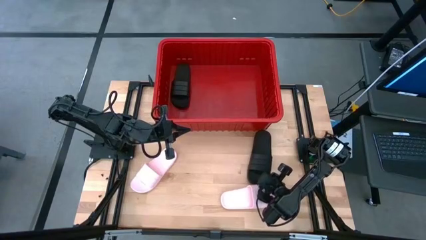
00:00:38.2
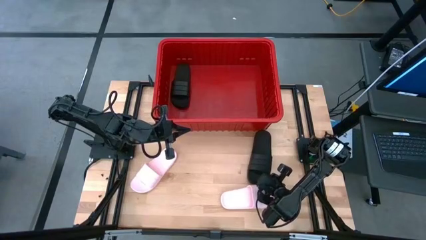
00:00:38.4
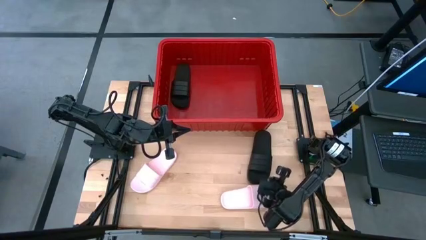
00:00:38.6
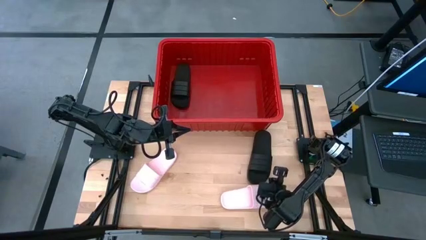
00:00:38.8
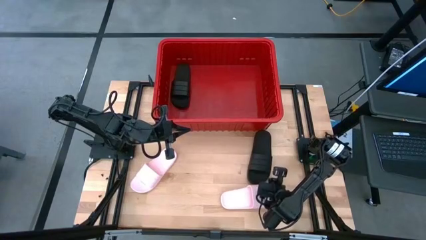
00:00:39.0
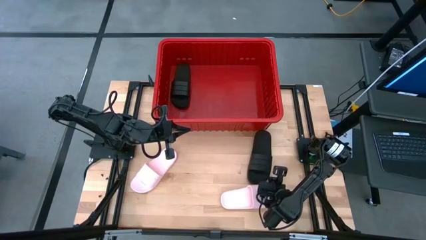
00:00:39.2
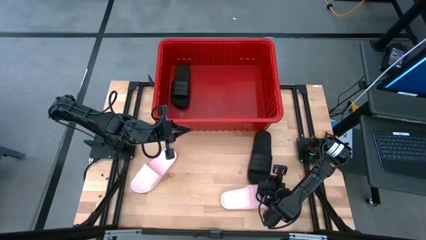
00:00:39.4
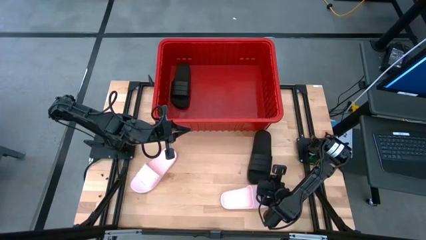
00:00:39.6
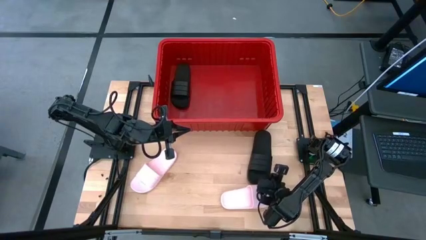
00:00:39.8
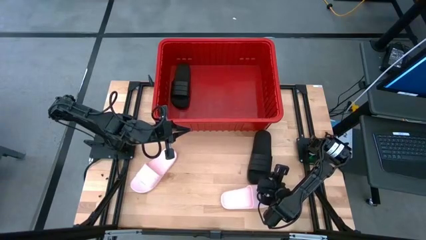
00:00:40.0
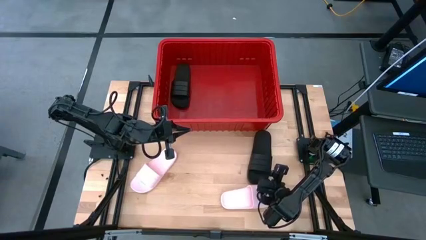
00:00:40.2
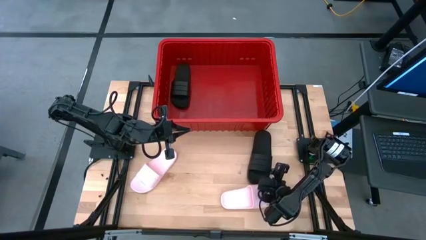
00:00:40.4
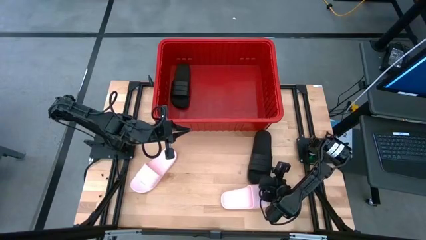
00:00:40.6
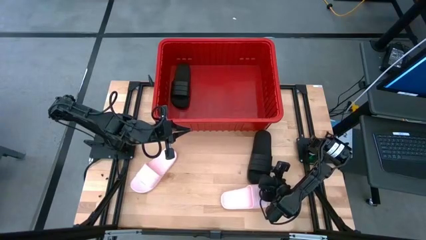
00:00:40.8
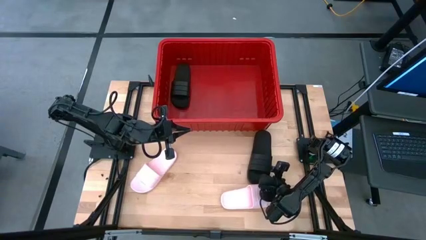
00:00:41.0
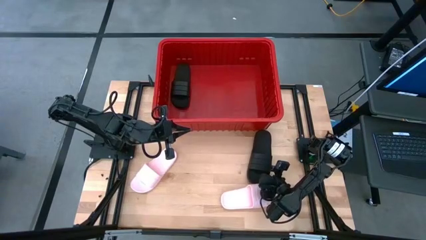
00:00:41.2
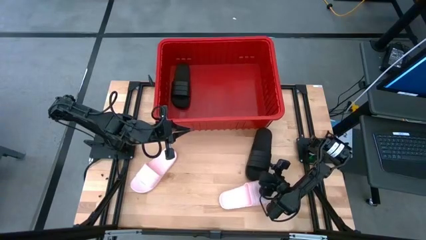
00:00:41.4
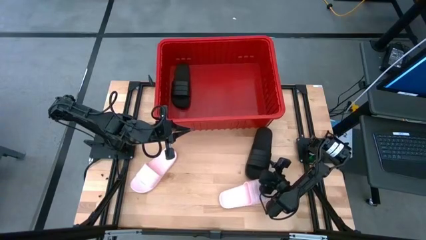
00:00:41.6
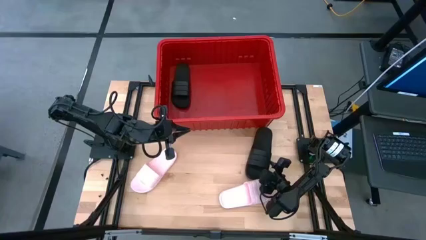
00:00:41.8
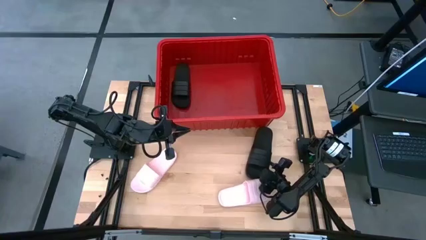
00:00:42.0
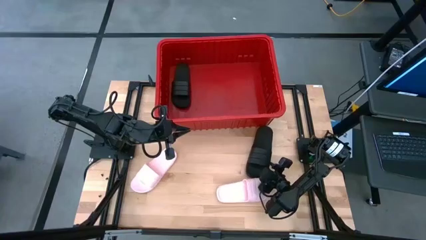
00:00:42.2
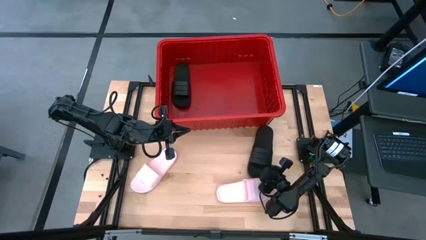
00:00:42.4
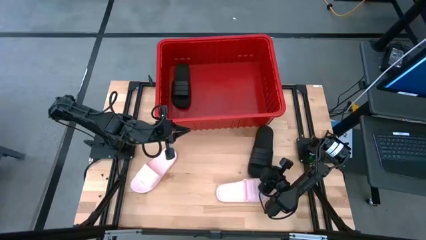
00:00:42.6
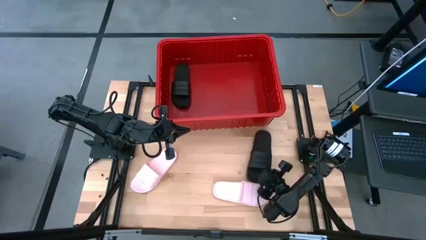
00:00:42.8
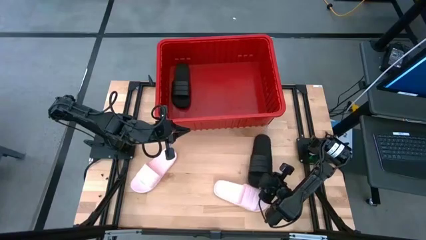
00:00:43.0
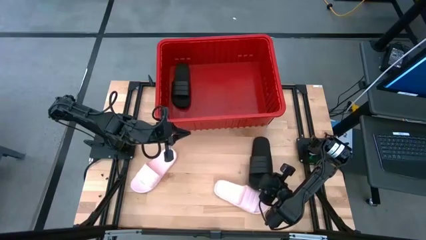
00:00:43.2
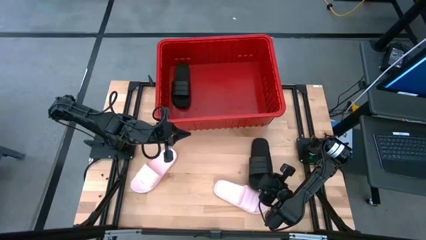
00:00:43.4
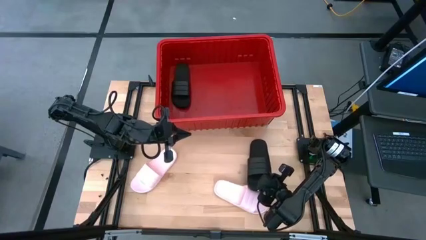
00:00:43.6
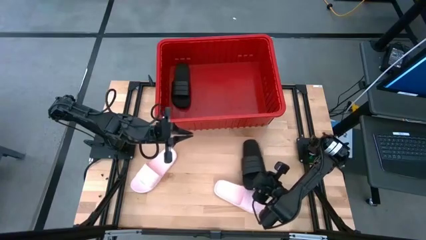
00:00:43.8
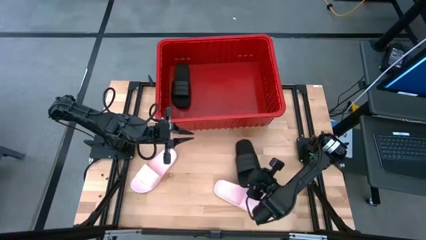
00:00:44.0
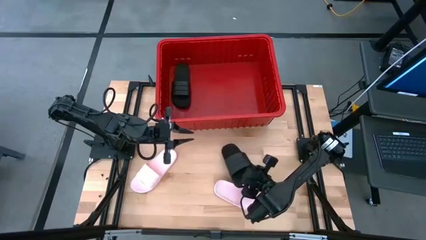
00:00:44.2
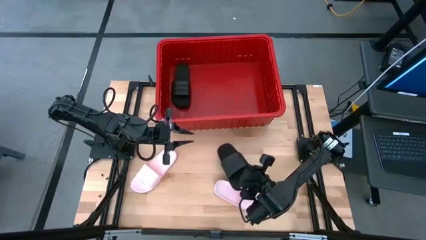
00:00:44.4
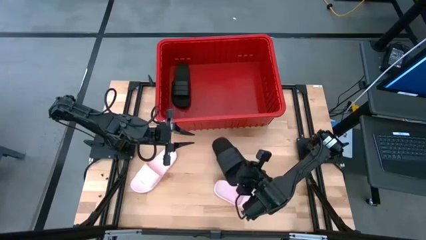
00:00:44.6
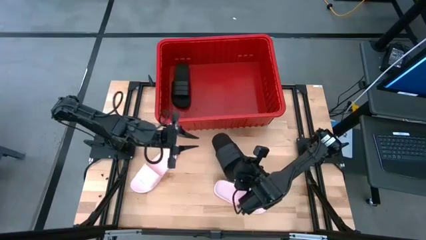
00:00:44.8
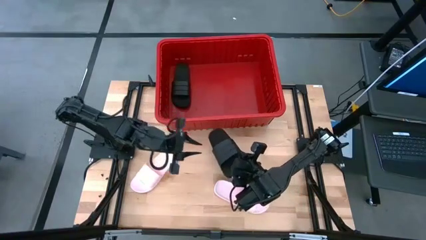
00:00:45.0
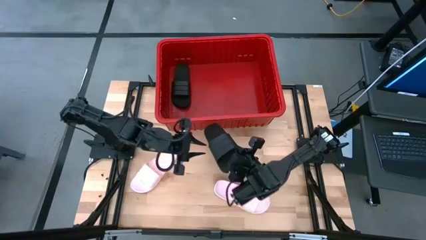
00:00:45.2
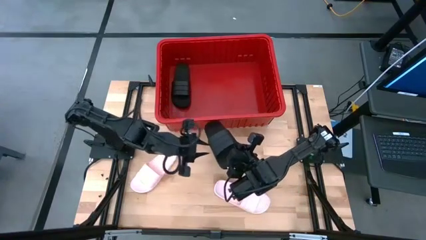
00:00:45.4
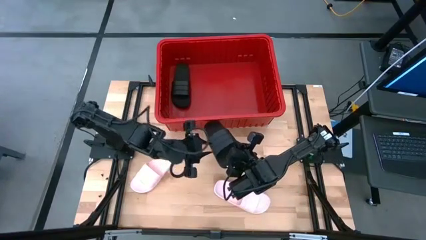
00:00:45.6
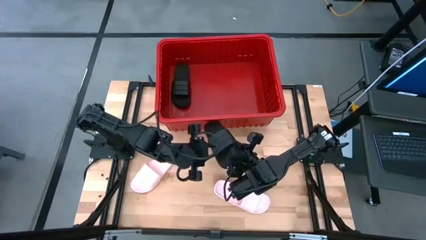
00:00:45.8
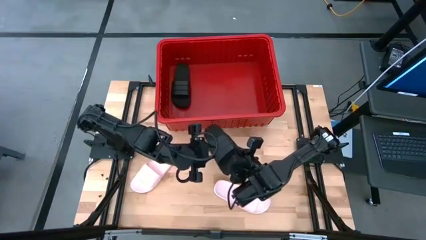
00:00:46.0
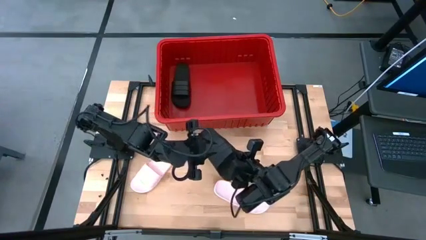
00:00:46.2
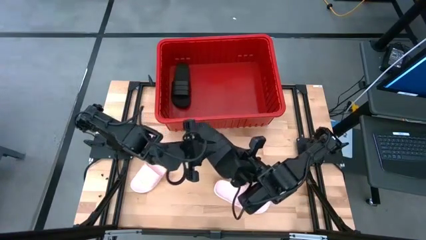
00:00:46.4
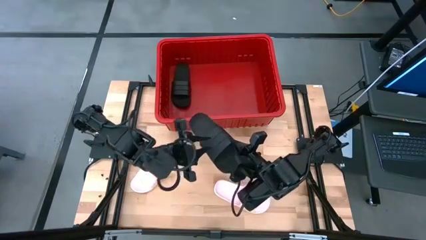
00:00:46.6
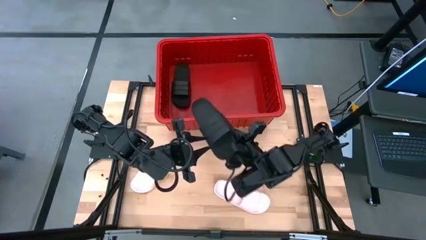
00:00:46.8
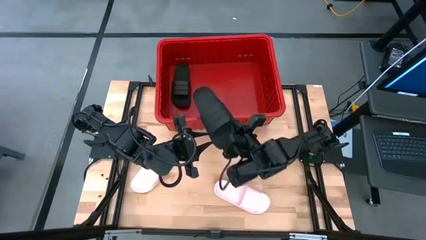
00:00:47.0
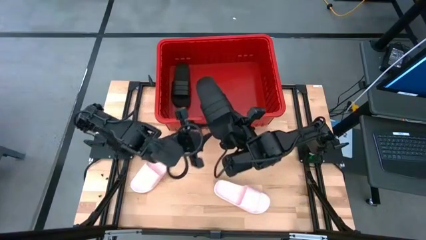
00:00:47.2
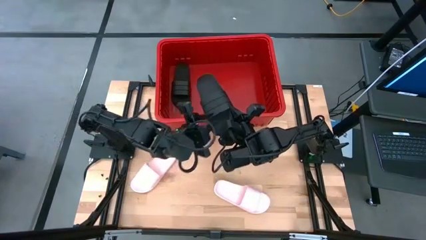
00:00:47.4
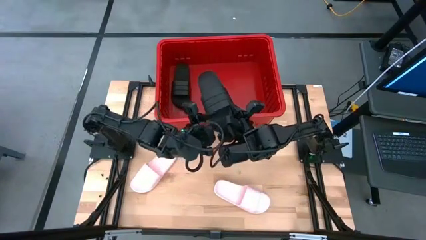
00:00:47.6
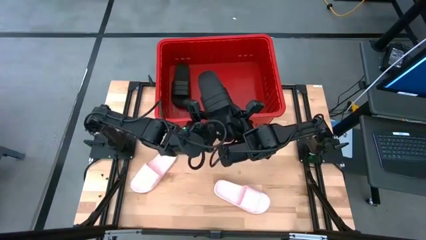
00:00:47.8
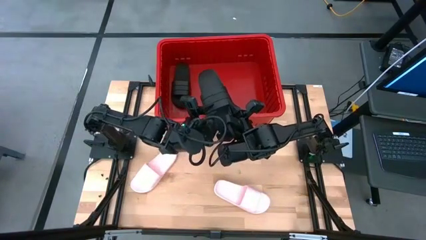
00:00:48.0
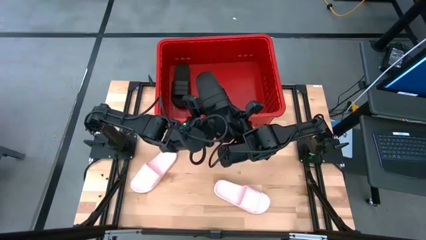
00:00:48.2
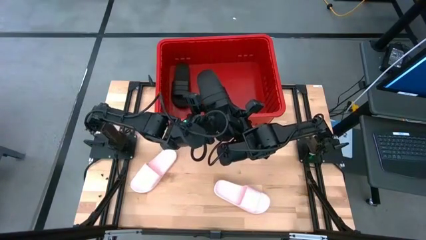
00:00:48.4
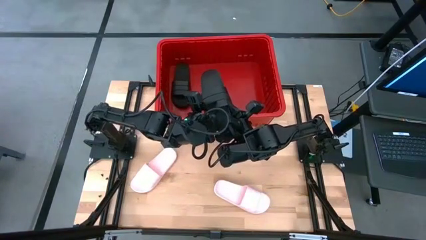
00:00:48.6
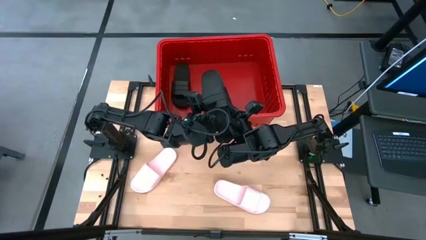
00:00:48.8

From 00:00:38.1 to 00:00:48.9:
Task: Pick and place slides into bin
Put the black slides into the red bin

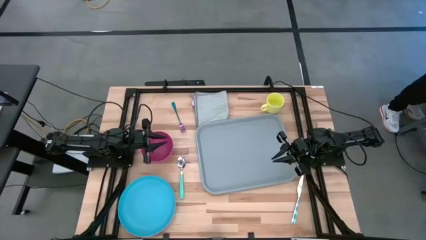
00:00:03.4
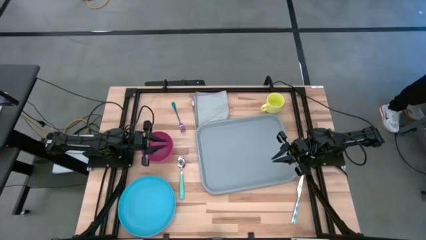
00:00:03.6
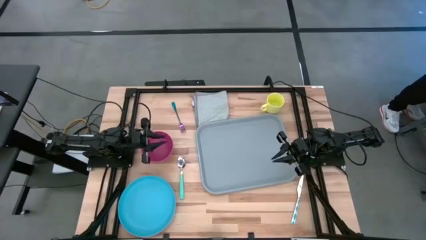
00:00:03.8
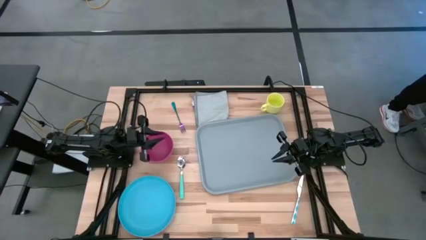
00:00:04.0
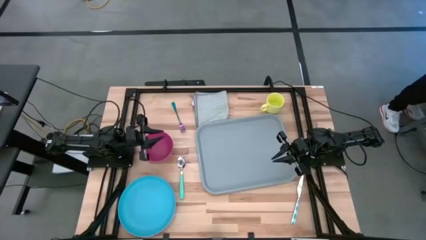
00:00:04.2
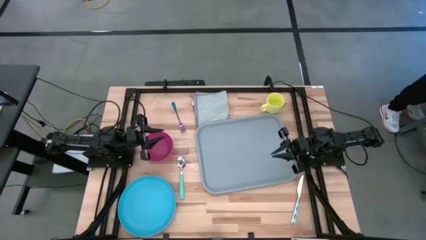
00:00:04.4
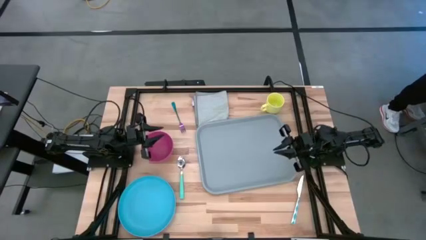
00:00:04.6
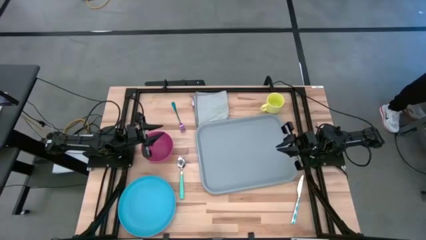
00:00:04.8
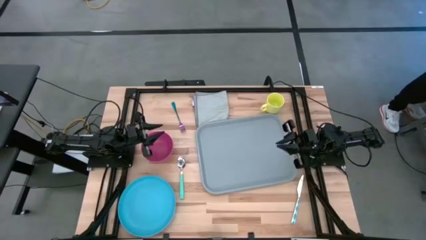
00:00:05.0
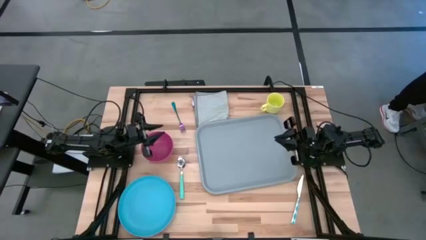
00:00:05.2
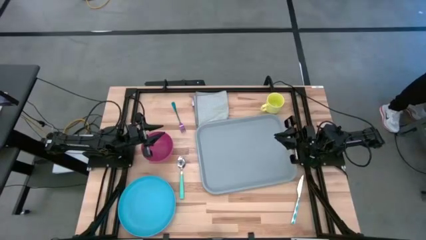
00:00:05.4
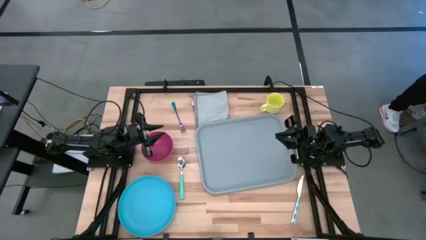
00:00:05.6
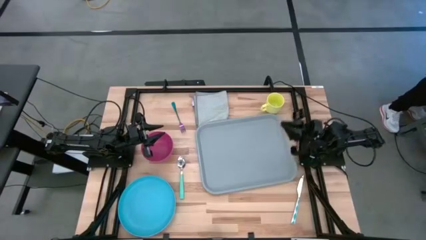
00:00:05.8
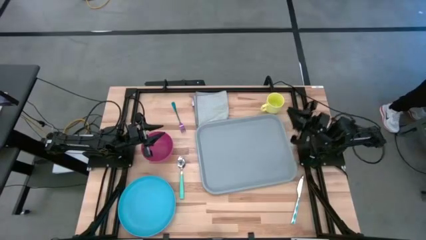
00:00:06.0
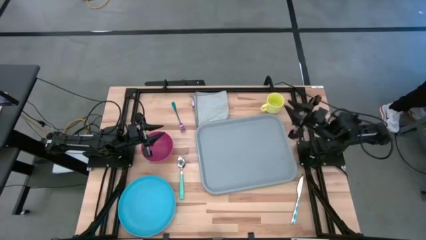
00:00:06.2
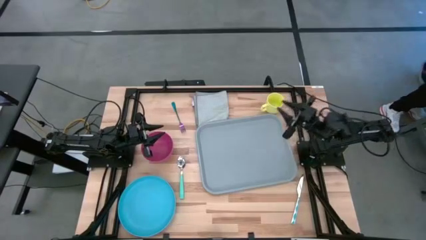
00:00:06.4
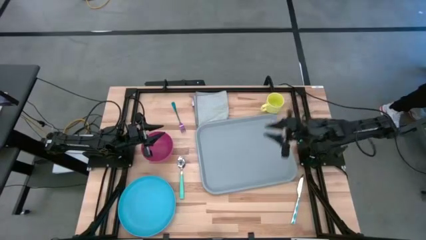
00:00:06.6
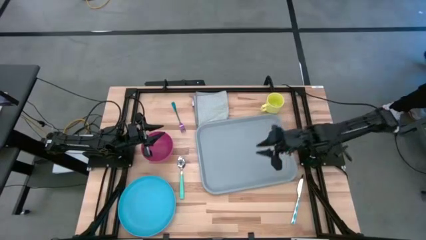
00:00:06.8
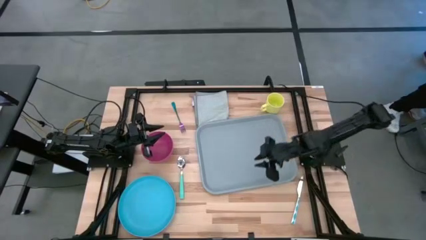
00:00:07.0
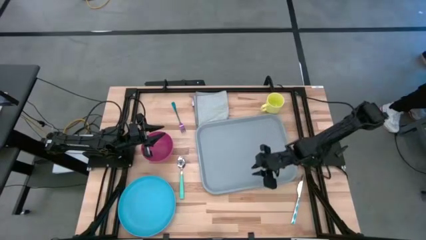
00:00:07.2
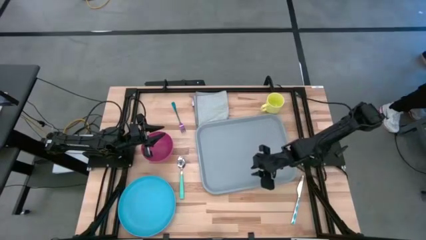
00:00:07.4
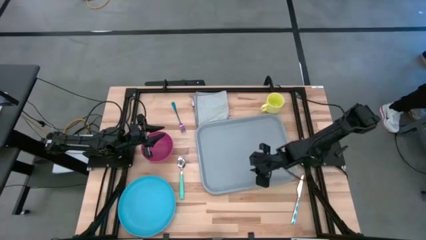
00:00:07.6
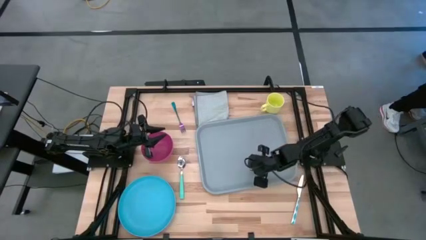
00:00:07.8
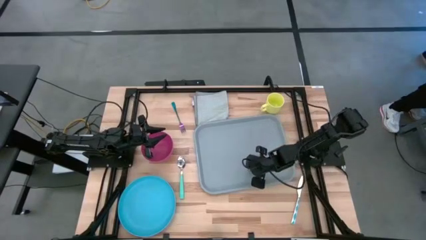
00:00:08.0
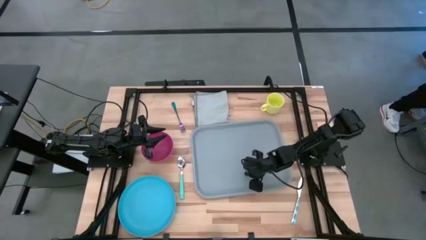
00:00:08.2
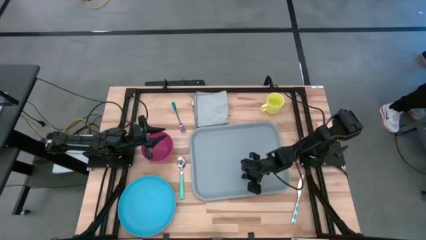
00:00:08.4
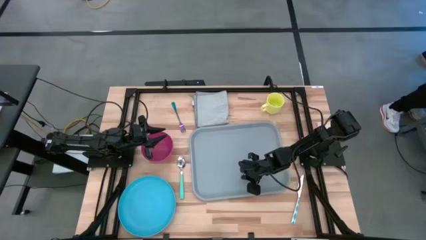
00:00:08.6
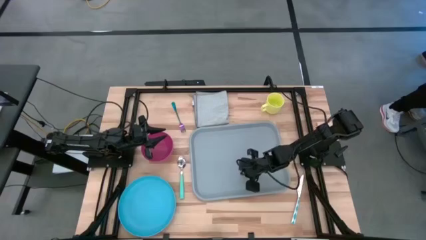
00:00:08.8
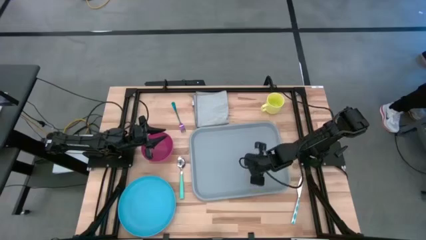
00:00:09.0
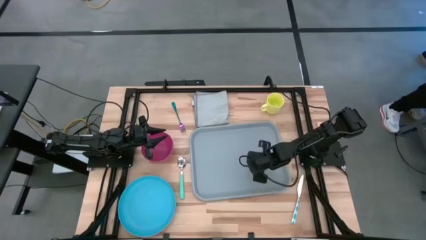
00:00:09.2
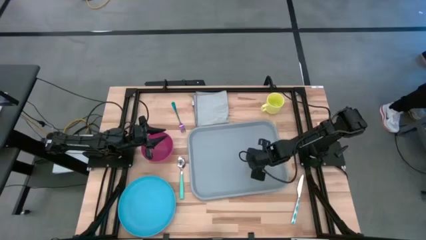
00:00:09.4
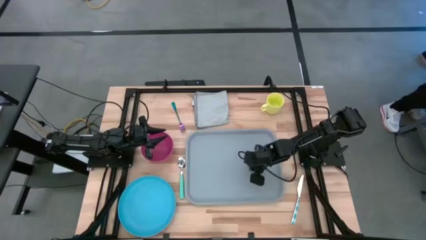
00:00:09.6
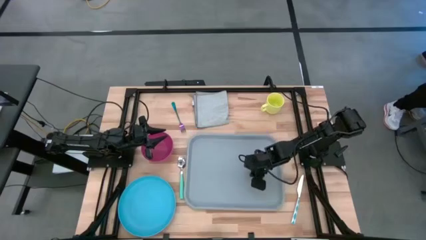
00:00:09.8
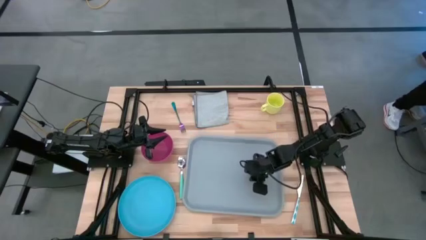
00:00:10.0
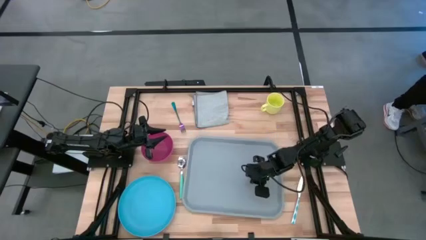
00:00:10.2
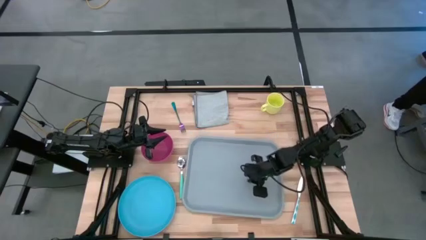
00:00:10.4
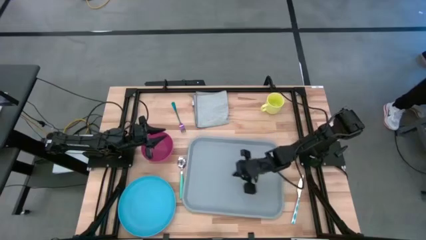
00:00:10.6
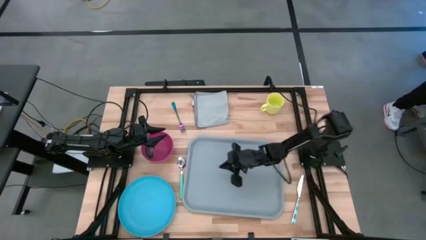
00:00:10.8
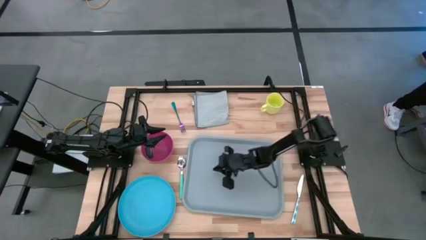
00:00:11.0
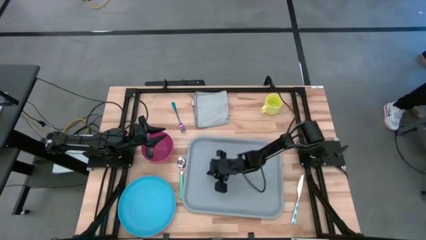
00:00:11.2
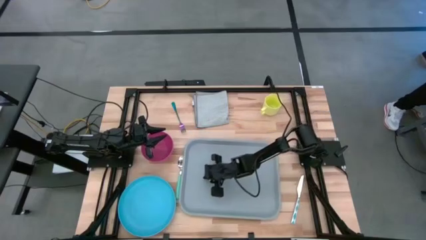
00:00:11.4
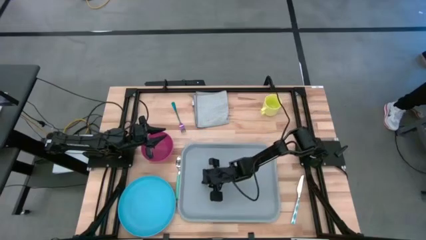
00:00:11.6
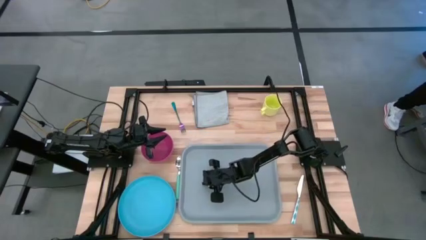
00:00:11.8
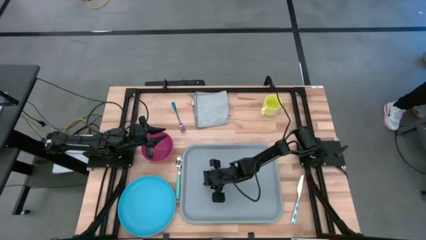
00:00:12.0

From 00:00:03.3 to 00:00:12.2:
Task: Set up tray
Move the gray tray to the center of the table
